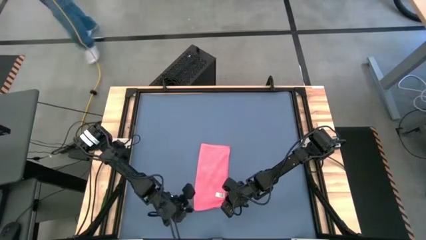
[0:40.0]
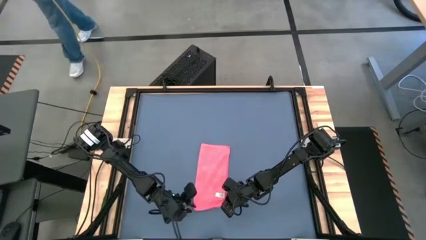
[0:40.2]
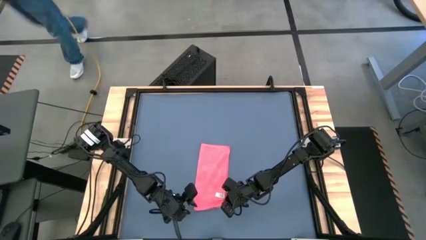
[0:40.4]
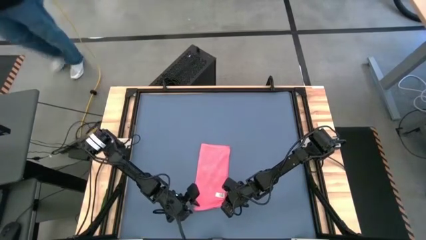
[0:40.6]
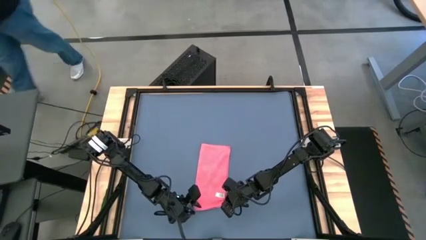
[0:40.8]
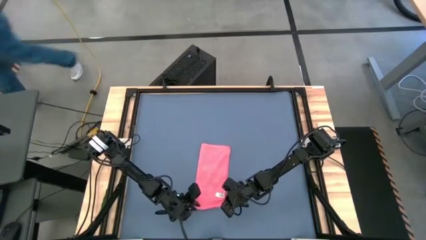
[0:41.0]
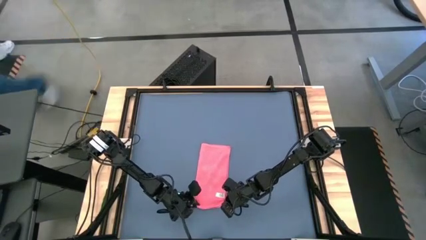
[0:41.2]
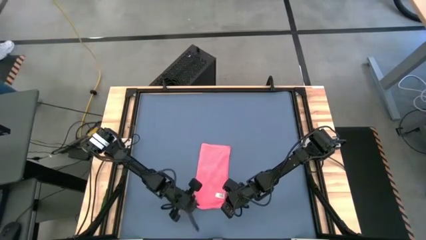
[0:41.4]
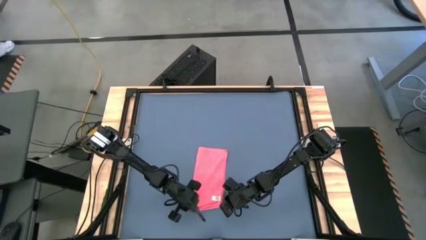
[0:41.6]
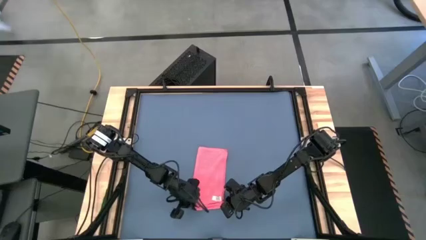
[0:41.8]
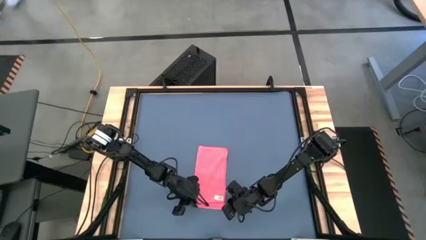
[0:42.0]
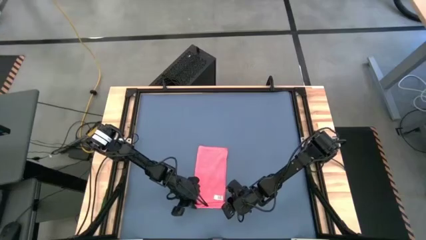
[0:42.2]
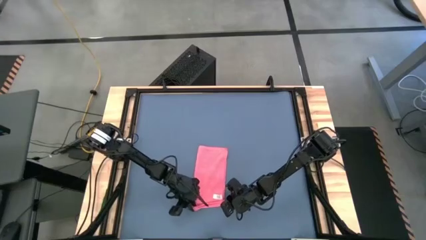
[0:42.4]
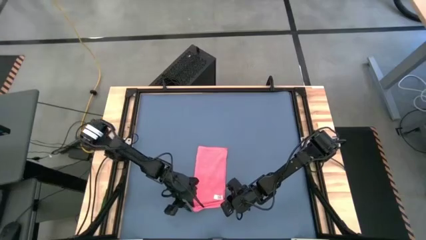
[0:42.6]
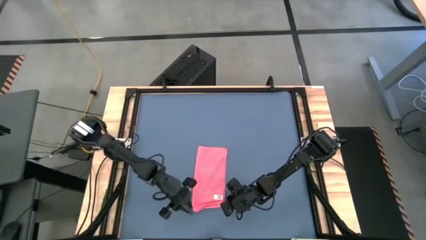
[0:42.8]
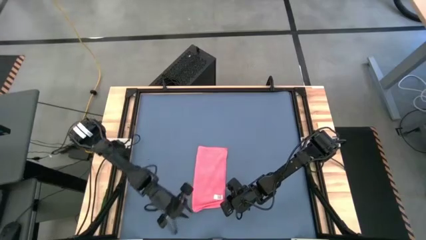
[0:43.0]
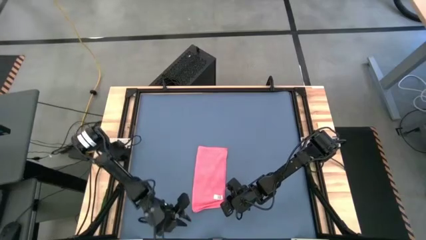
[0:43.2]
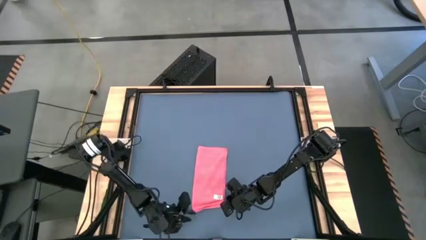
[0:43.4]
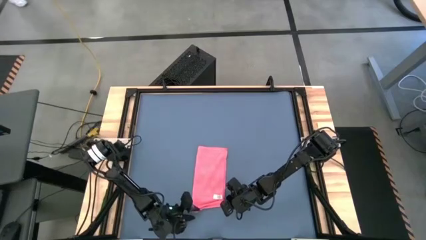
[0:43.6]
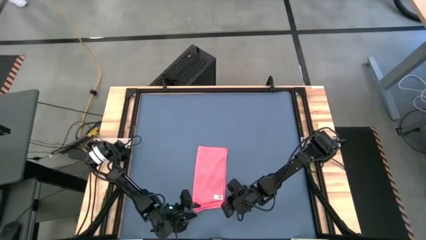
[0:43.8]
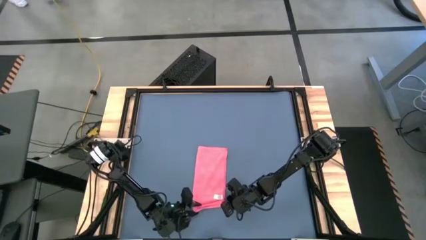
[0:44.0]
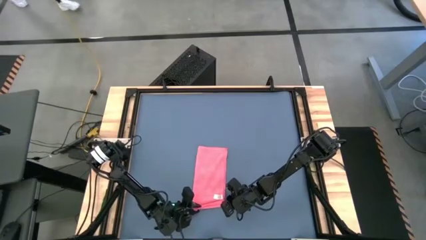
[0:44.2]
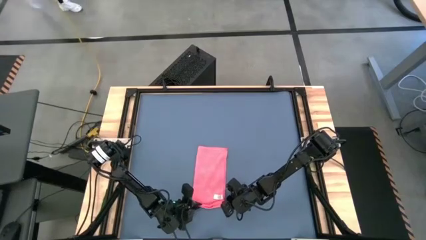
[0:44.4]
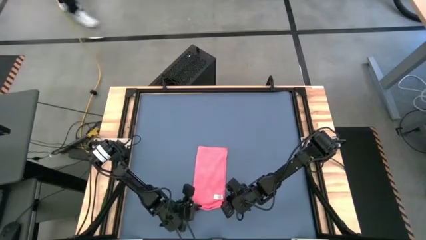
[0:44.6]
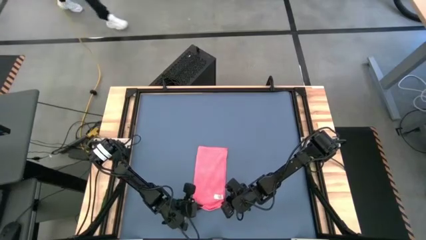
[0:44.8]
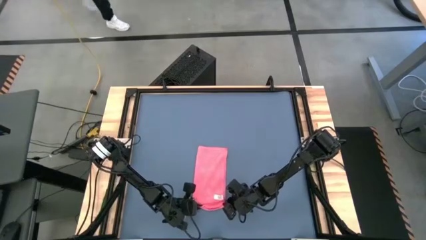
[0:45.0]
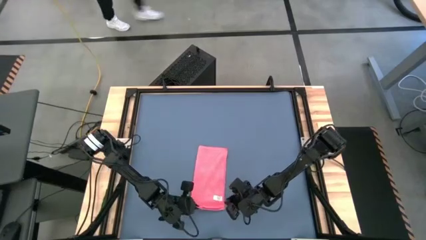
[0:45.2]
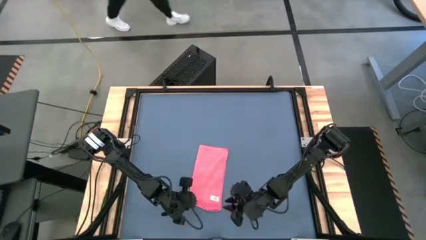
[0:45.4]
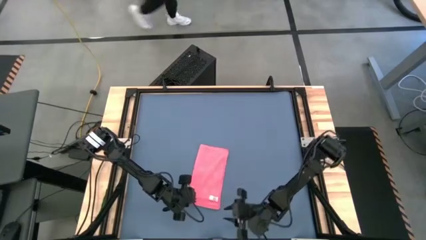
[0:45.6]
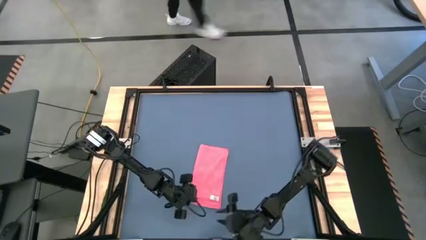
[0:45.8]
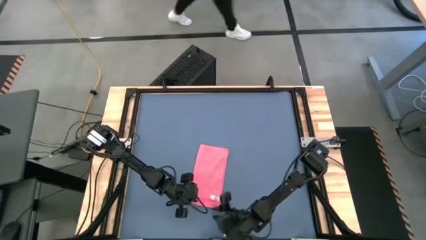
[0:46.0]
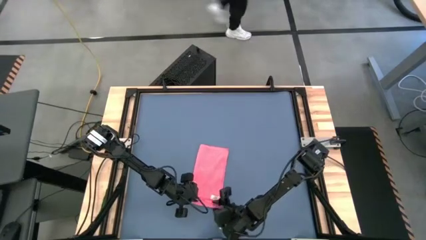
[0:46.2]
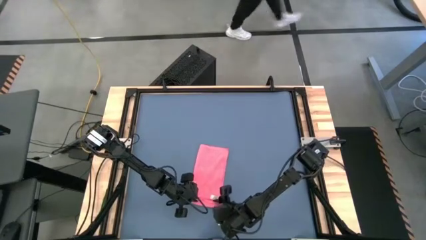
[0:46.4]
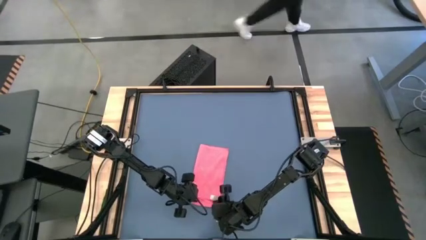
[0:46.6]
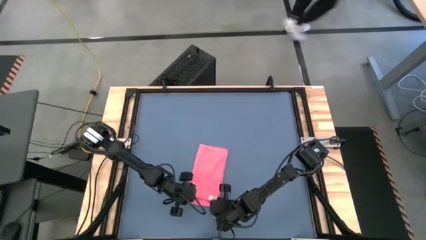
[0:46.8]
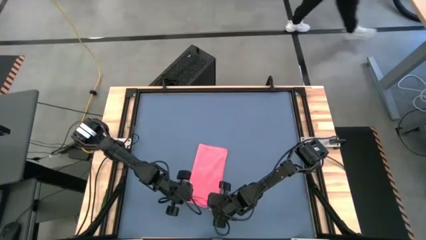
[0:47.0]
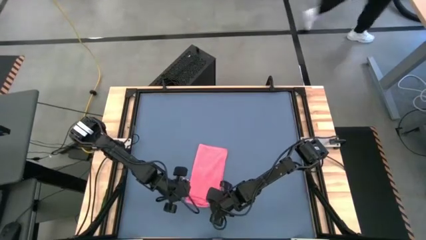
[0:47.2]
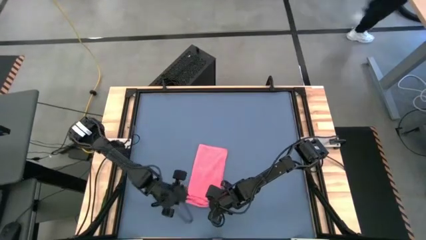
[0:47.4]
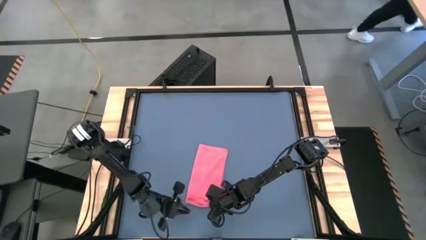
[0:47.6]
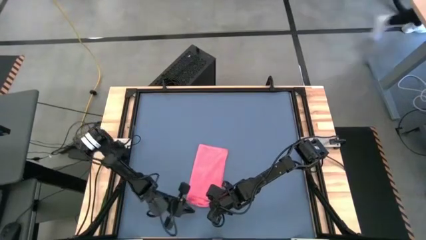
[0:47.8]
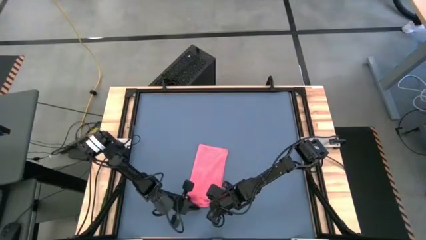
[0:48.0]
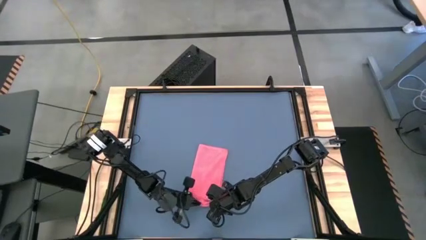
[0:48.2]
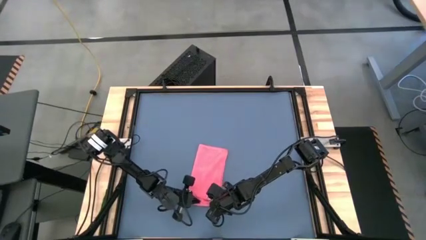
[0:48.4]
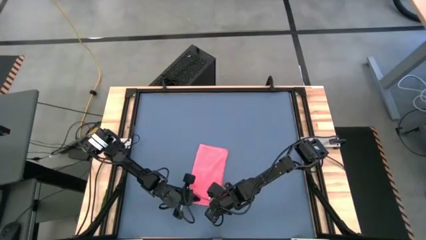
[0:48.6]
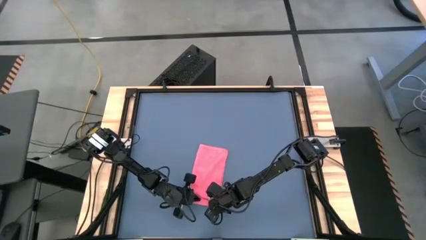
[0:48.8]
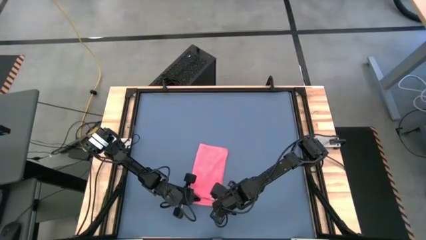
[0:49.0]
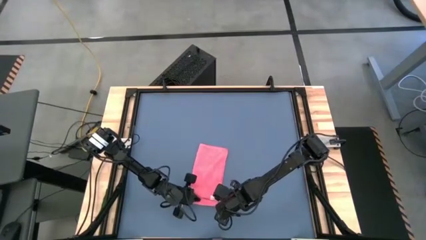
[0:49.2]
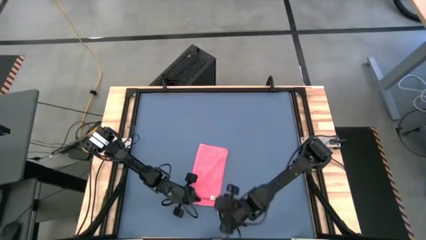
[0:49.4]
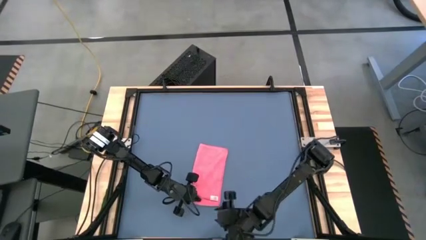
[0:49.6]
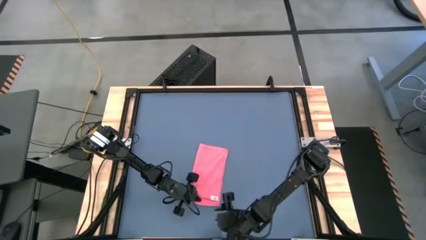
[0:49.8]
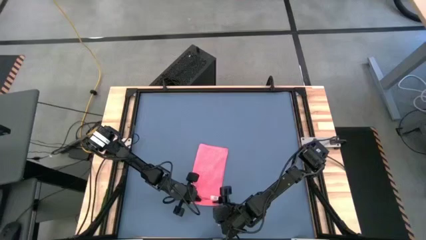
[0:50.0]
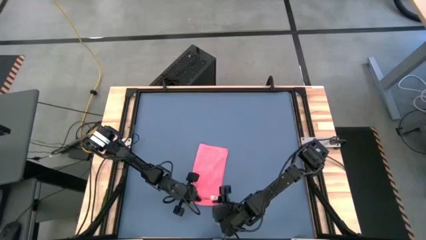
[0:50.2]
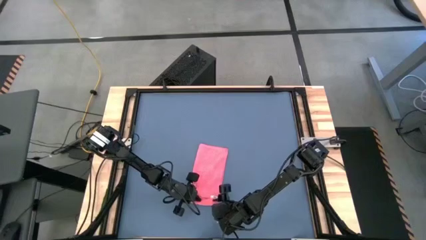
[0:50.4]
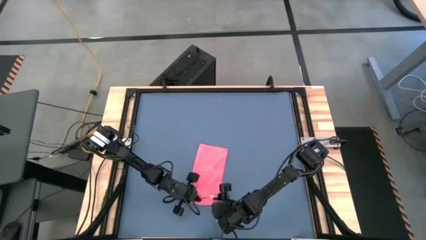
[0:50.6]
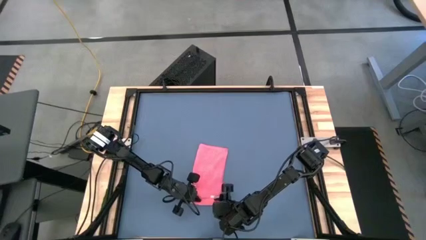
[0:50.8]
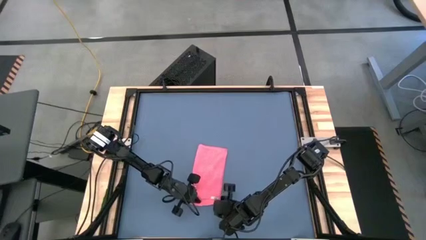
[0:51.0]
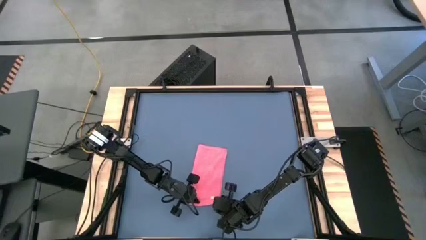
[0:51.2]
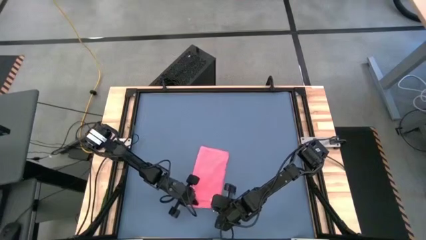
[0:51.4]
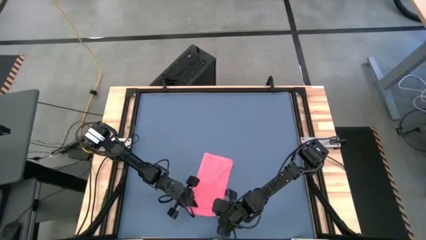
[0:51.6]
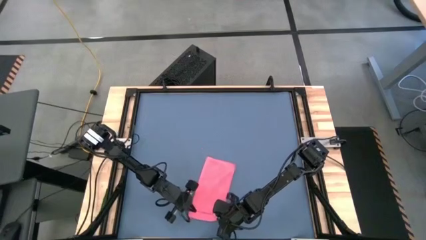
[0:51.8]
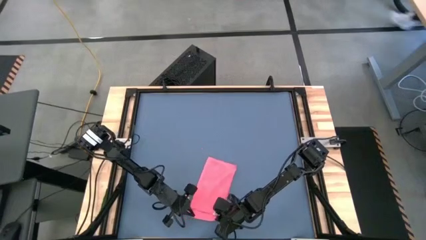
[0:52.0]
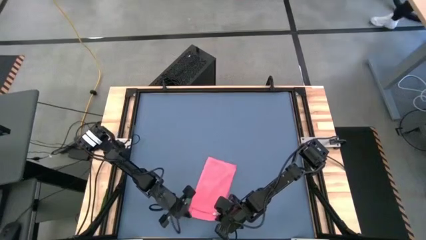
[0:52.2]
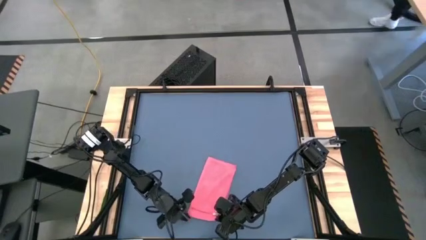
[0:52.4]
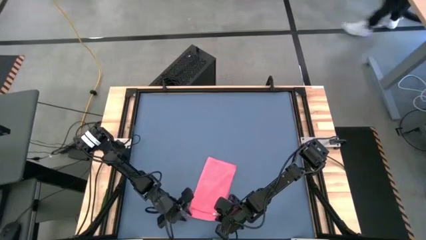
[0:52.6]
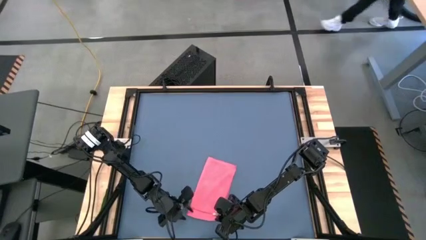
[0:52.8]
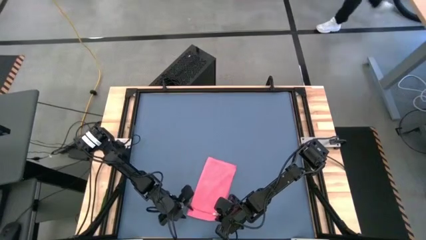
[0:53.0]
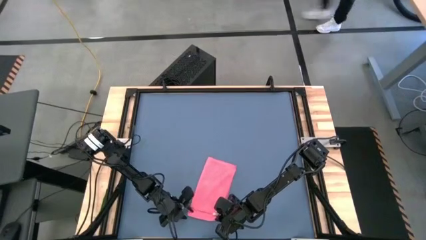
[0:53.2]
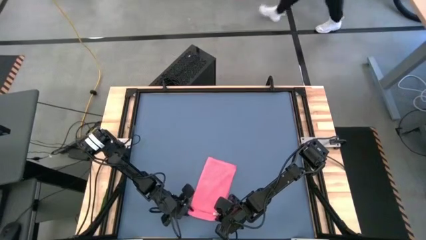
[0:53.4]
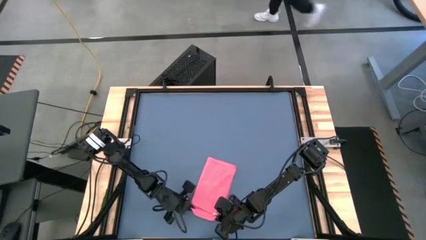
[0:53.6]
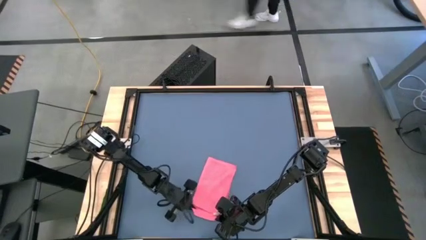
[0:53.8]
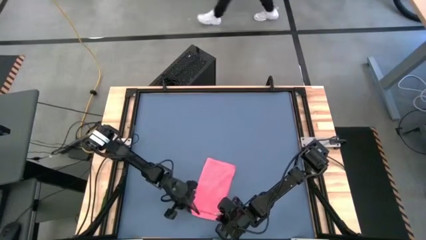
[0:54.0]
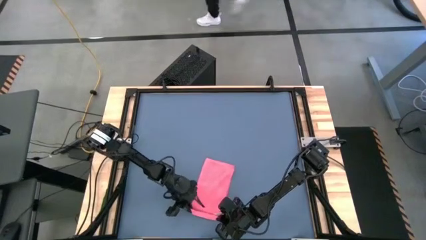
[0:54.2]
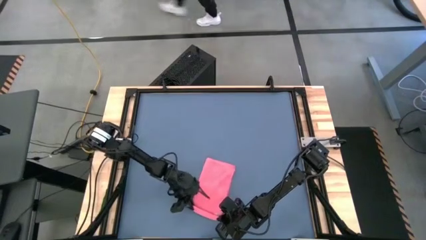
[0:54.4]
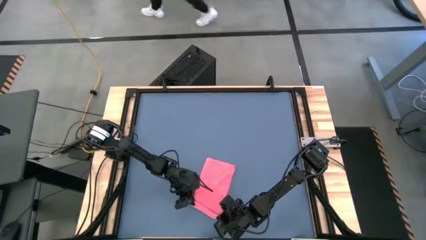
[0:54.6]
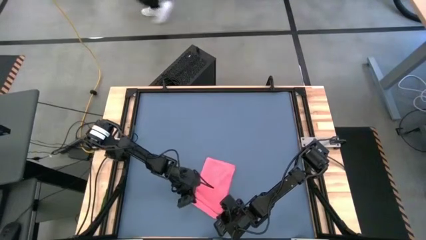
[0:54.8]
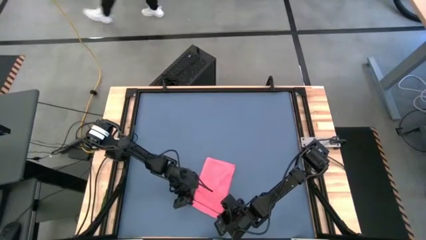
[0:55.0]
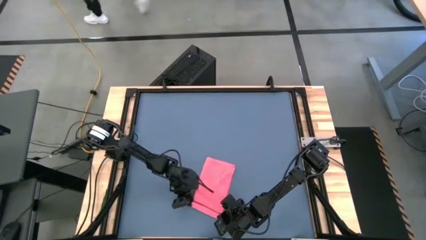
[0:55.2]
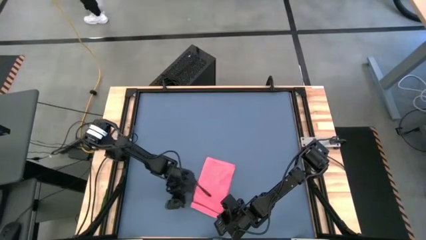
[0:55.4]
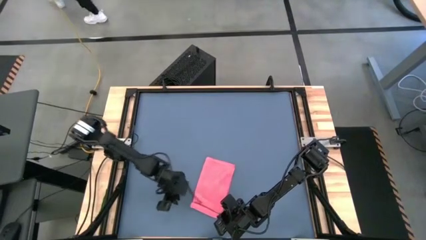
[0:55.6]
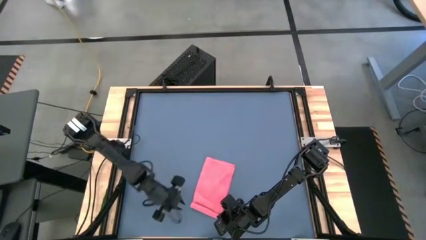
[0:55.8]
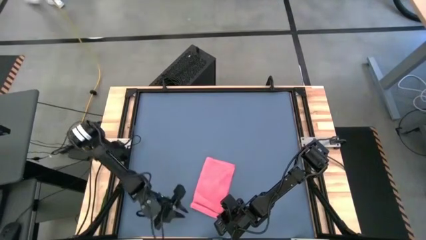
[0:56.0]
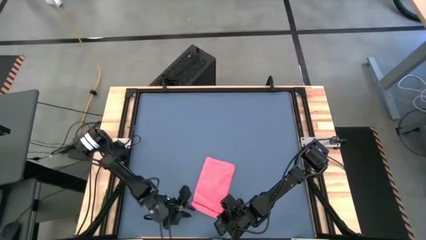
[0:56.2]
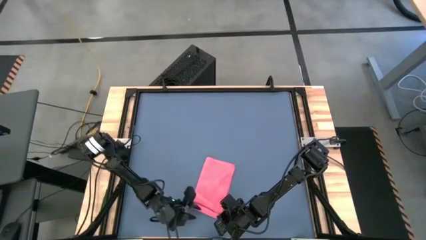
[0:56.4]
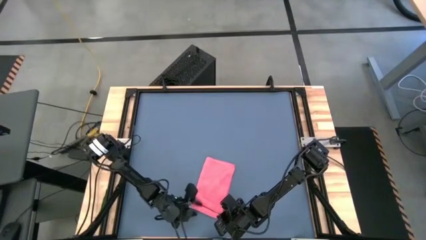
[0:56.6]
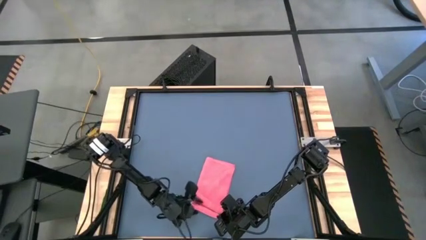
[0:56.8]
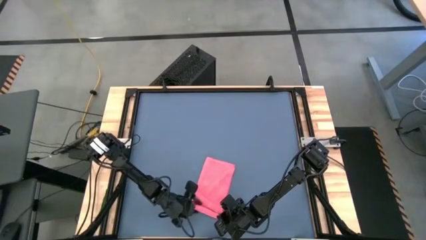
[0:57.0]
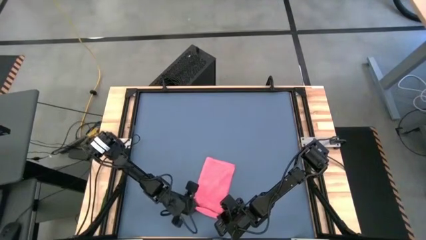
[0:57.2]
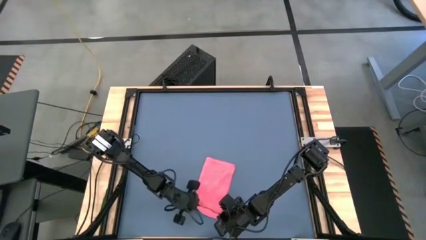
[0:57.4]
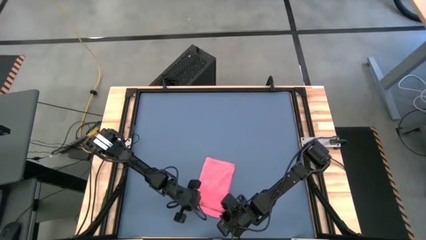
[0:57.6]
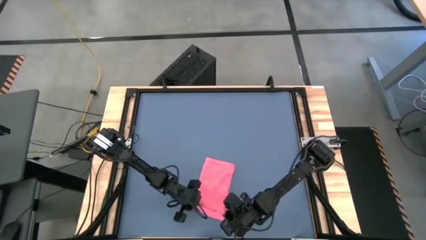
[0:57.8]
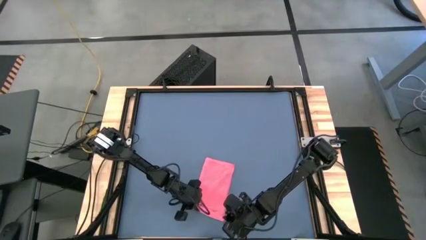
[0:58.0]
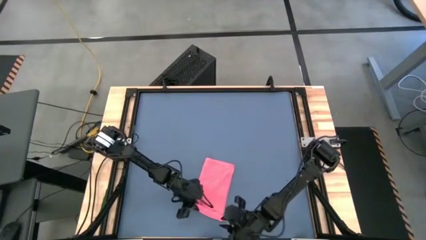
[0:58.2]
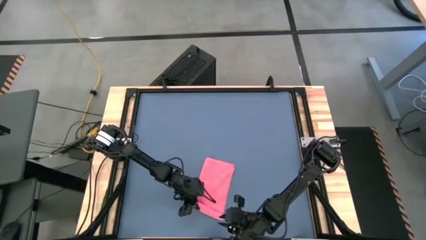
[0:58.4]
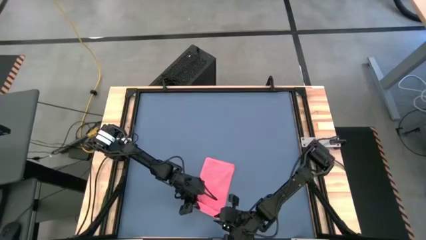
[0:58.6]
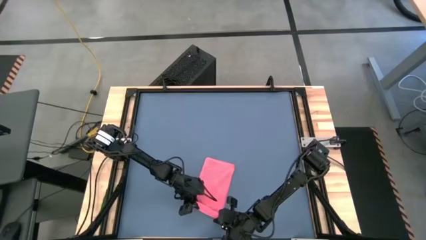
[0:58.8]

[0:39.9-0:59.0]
Task: Roll towel into tight, uniform cylinder
Roll the red towel
